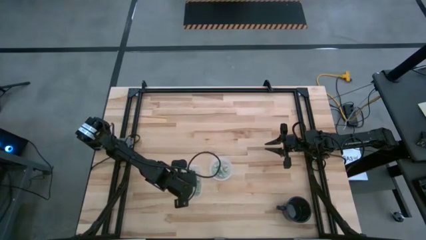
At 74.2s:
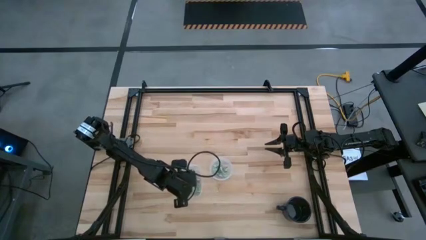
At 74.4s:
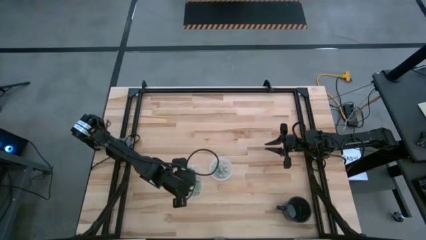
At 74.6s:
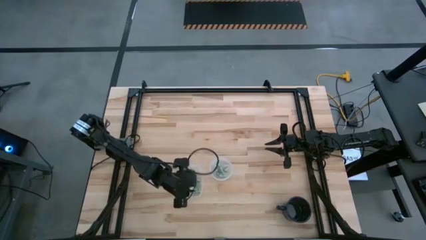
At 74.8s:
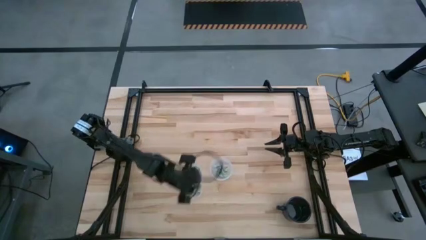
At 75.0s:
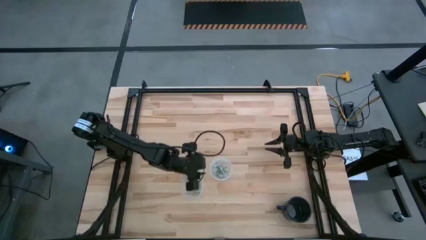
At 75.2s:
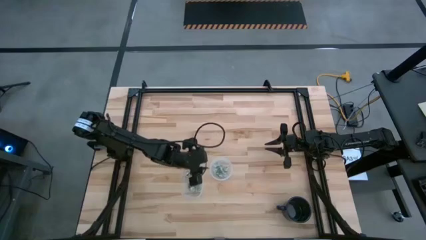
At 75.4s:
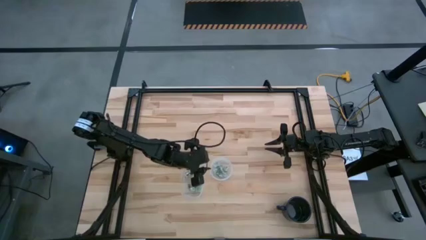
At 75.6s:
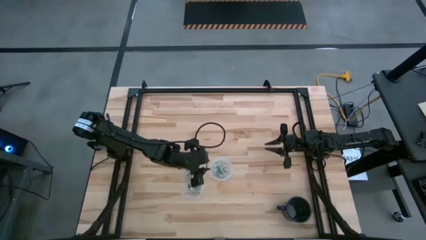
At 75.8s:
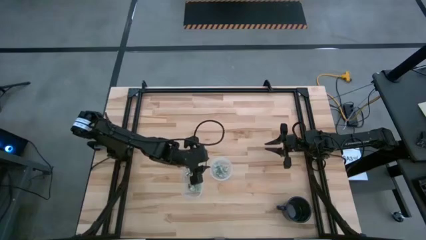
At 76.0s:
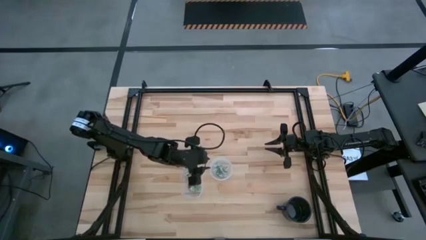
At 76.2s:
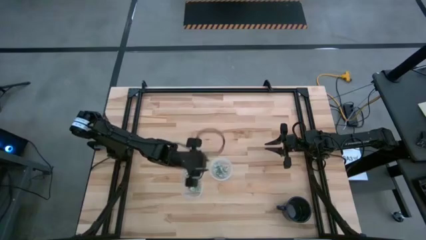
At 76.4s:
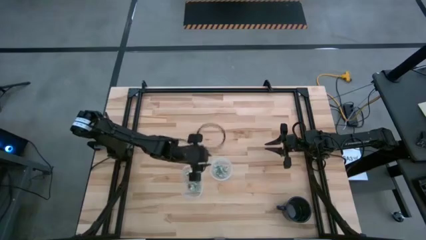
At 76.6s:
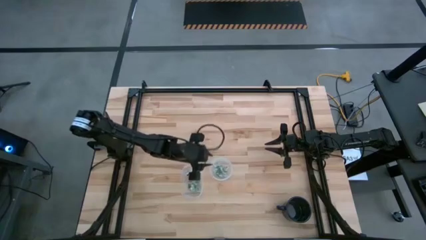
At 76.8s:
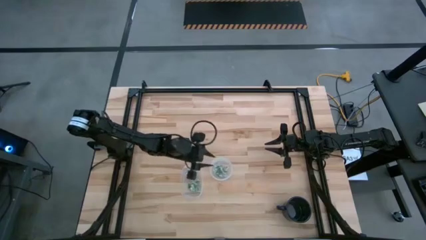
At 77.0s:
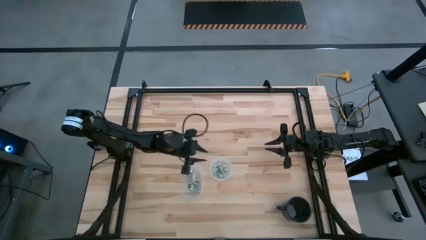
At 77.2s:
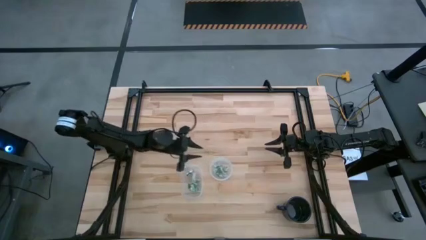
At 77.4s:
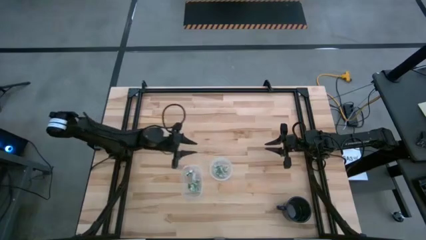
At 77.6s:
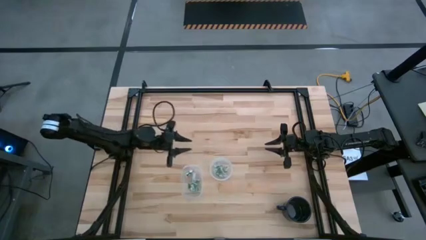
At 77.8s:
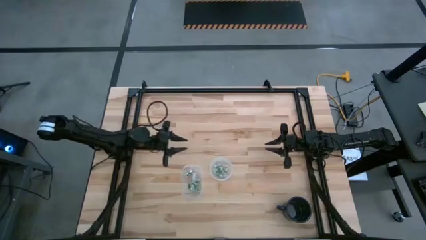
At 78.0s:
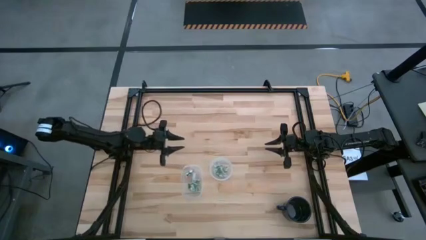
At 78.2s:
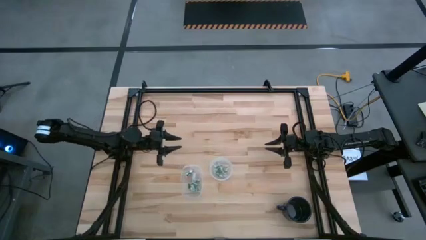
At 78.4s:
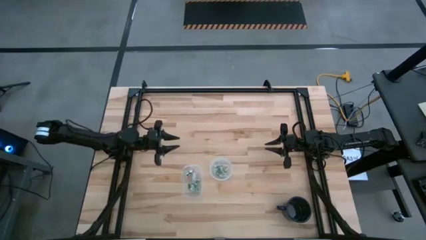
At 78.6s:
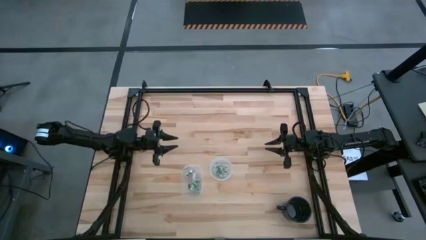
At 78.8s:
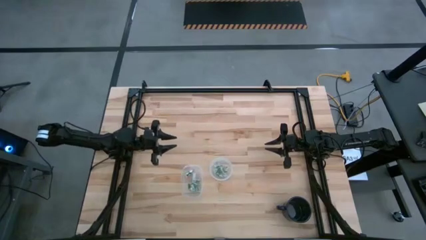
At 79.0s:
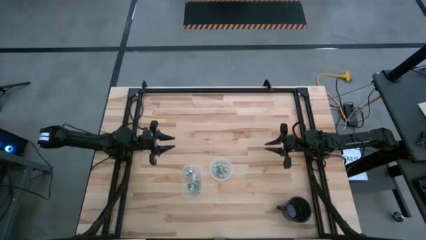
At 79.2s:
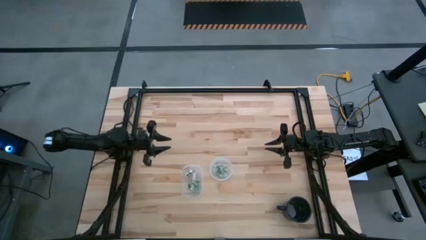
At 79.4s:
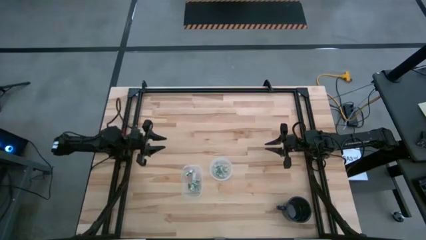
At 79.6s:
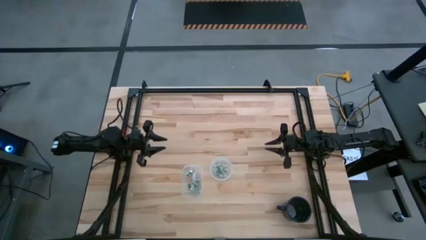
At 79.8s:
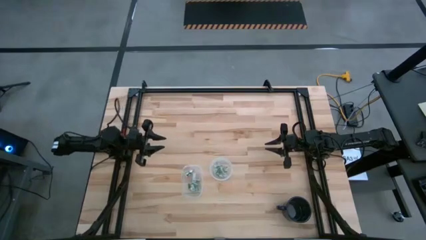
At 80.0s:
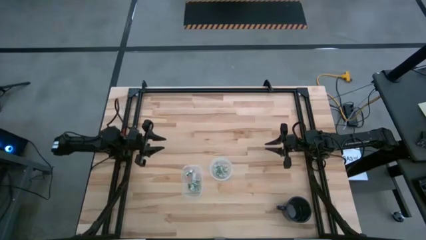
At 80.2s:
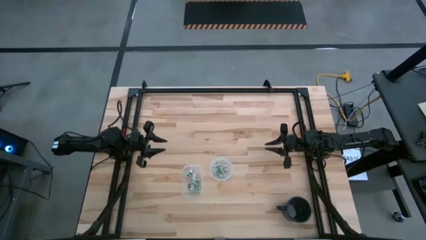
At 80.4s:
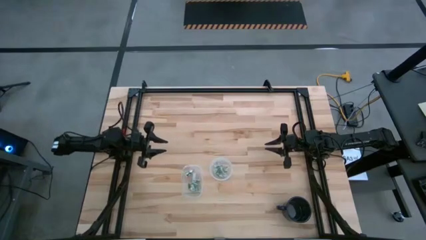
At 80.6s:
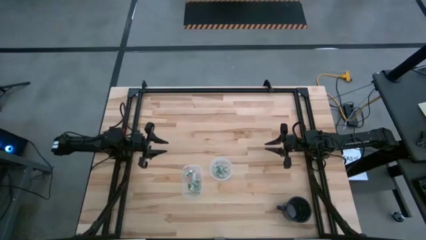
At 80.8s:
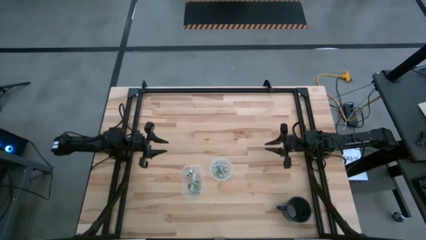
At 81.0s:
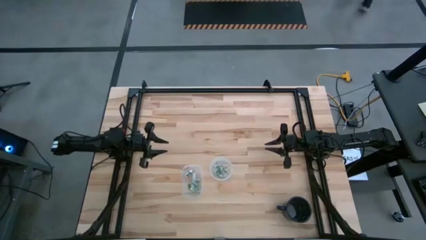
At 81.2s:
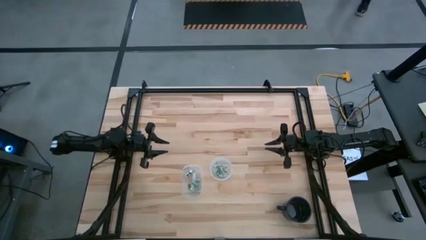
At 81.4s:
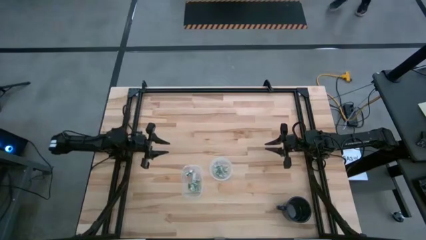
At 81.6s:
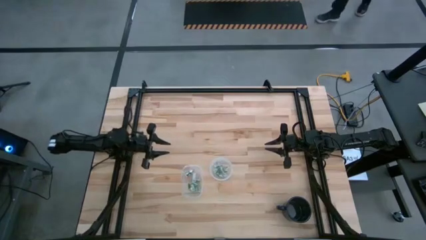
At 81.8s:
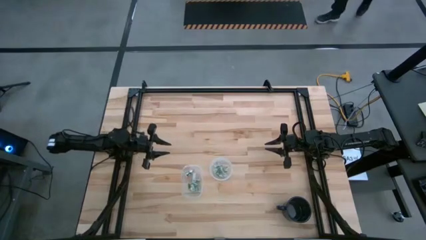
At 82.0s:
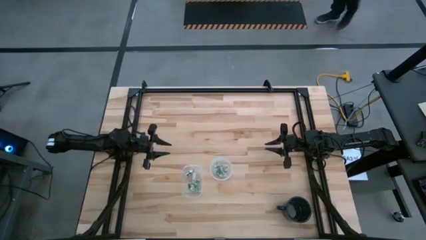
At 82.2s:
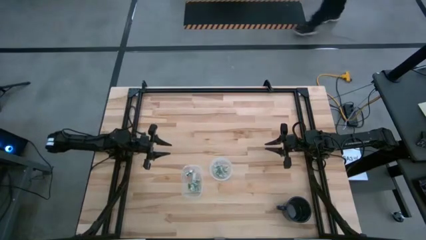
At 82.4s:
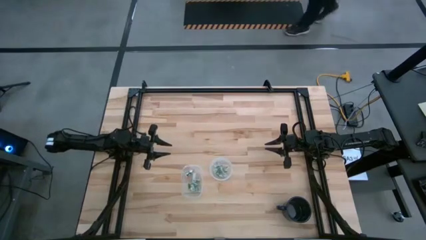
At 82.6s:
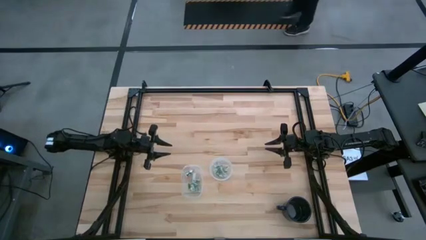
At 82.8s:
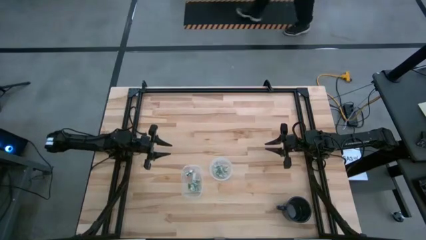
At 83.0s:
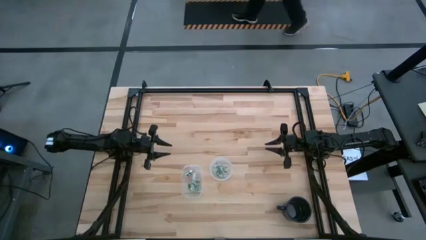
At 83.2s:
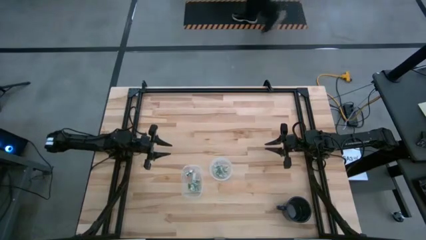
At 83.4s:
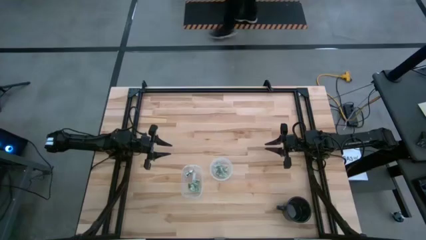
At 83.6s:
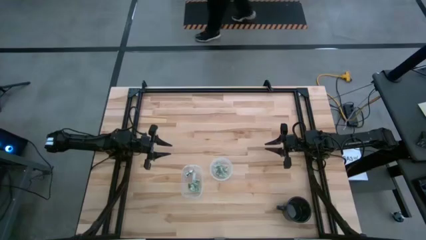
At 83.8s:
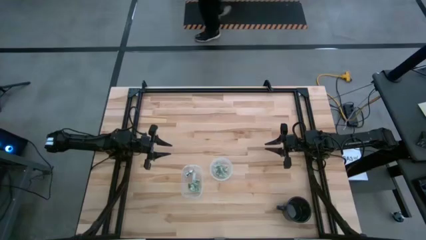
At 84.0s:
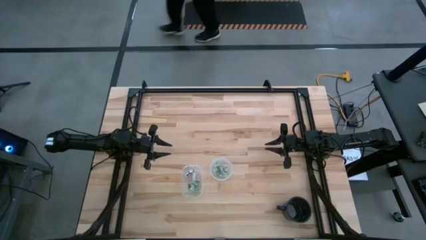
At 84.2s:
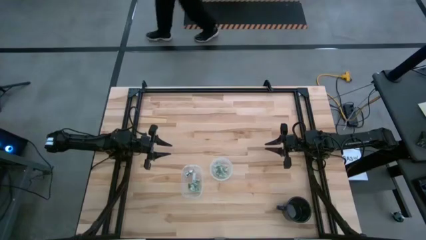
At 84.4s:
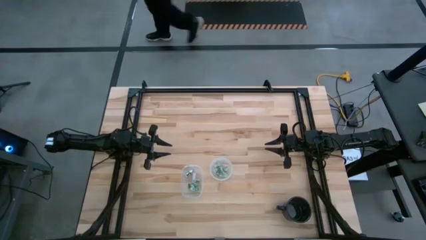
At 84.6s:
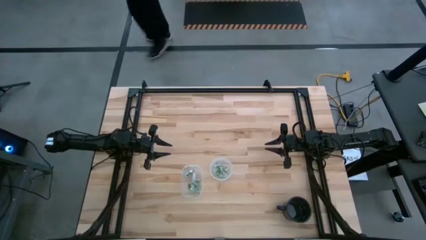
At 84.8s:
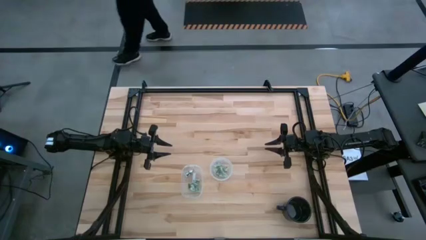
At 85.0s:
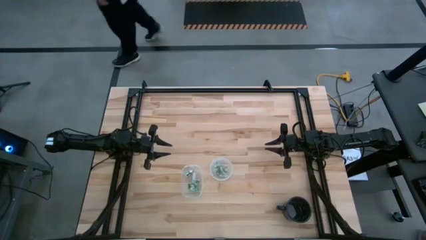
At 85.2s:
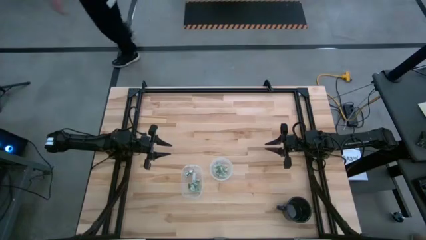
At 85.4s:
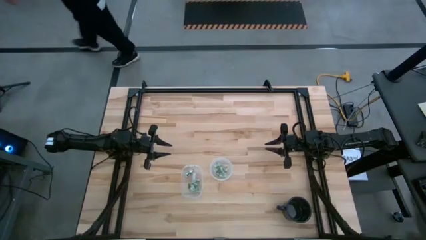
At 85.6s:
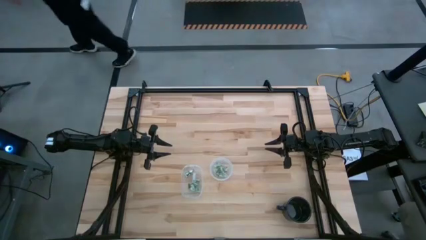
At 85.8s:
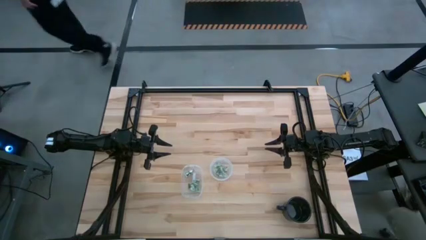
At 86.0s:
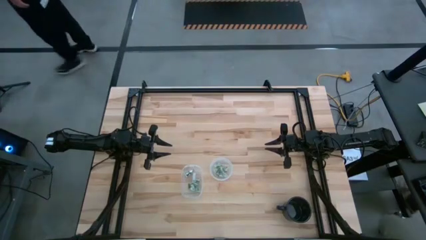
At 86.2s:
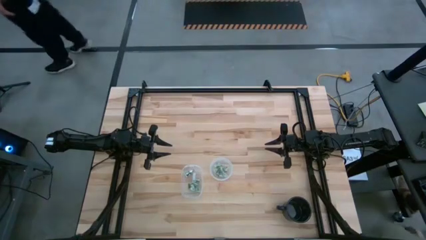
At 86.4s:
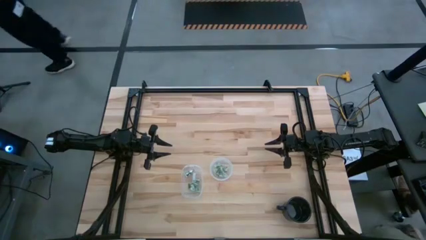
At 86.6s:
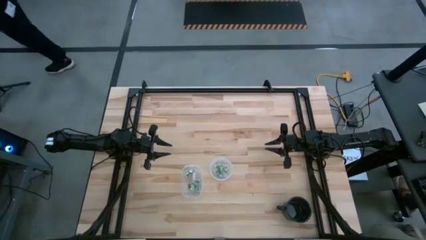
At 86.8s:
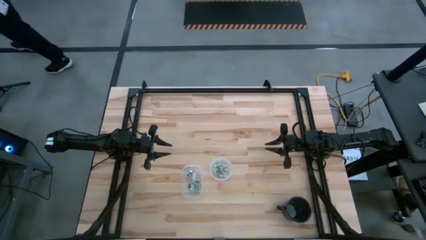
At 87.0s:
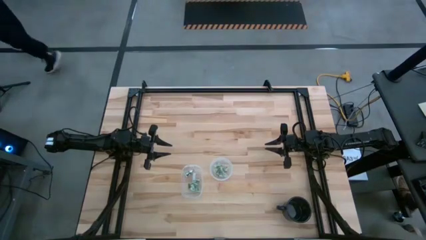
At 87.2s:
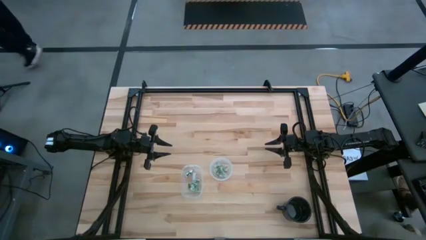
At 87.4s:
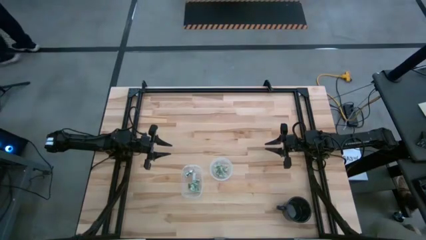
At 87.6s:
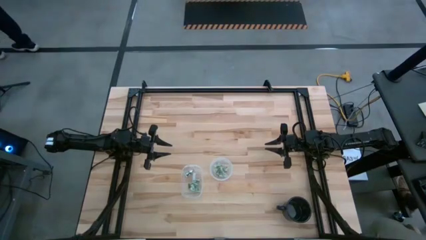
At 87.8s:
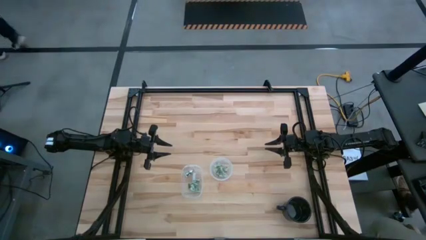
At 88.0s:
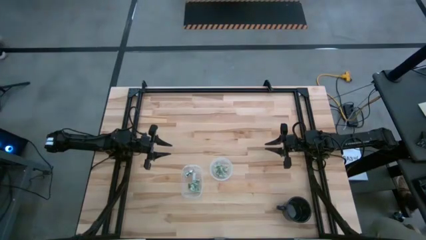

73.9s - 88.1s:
Task: Pick and place items into bin
Return to Home Position

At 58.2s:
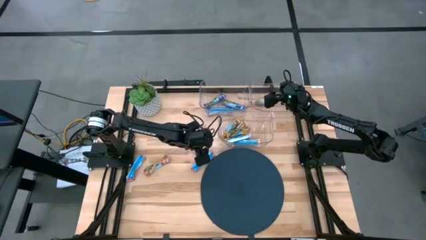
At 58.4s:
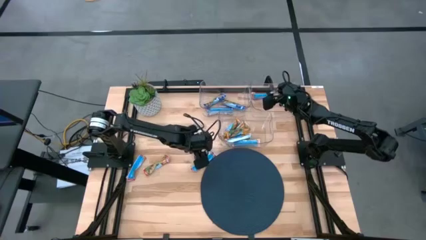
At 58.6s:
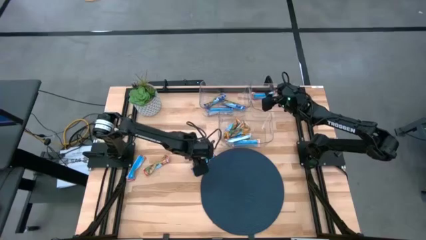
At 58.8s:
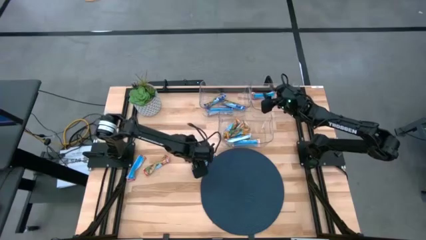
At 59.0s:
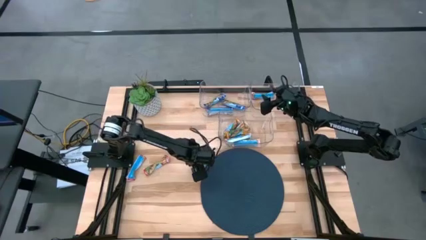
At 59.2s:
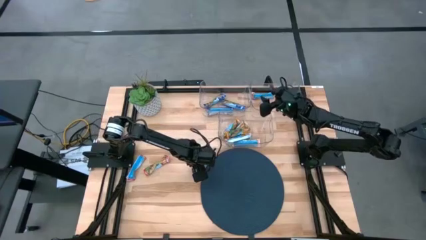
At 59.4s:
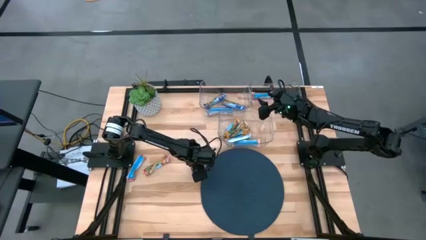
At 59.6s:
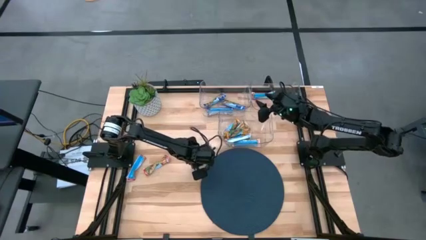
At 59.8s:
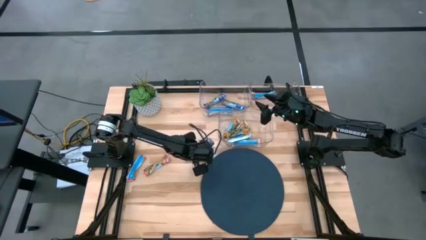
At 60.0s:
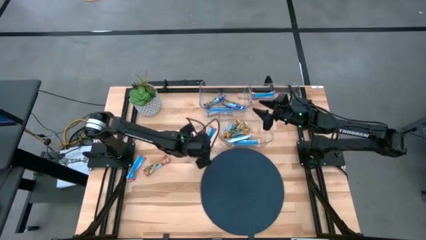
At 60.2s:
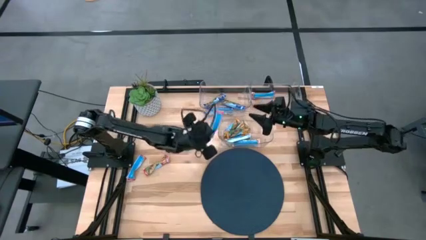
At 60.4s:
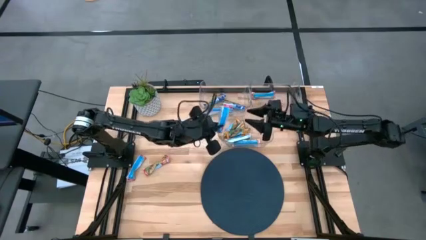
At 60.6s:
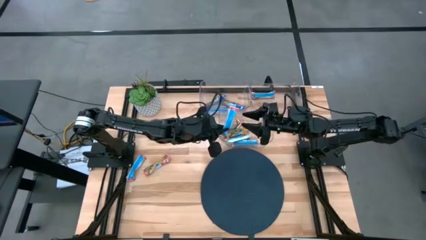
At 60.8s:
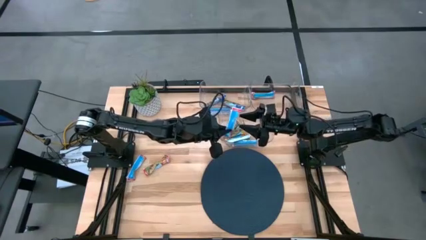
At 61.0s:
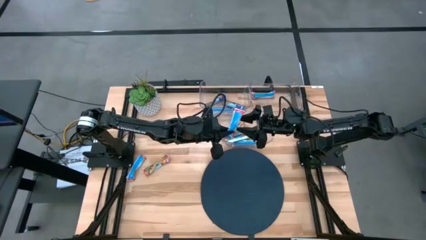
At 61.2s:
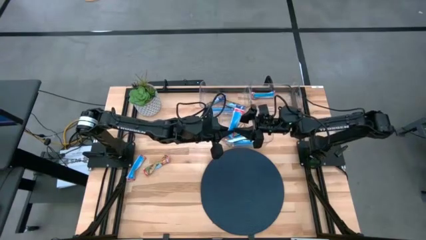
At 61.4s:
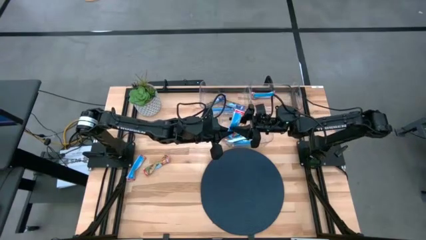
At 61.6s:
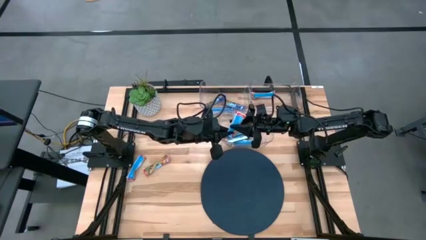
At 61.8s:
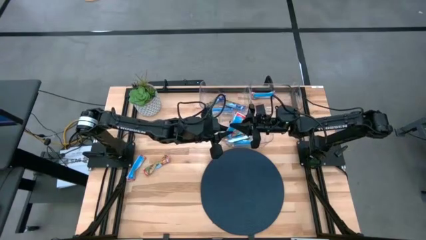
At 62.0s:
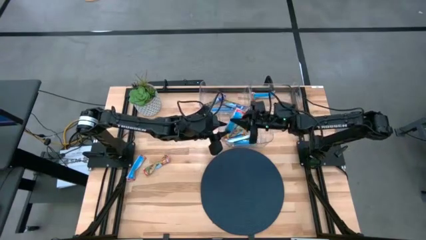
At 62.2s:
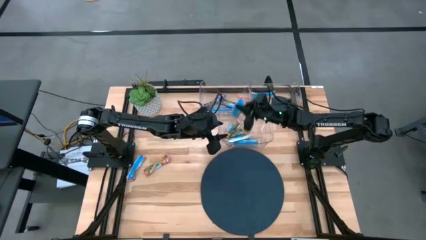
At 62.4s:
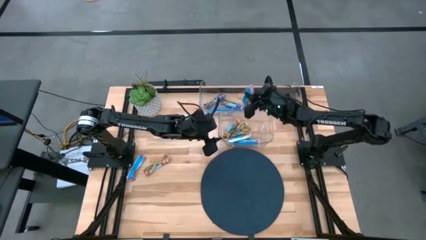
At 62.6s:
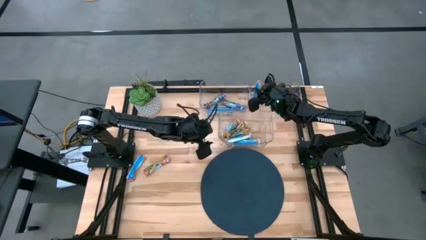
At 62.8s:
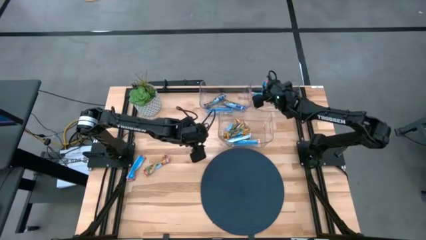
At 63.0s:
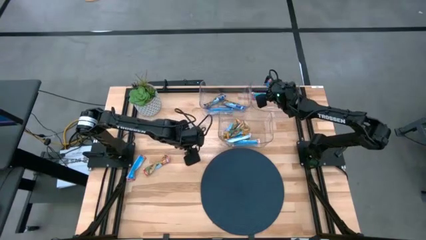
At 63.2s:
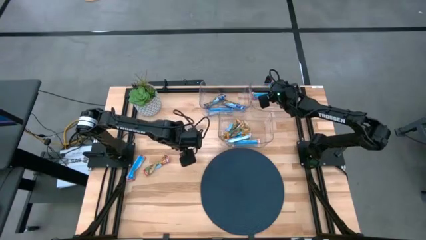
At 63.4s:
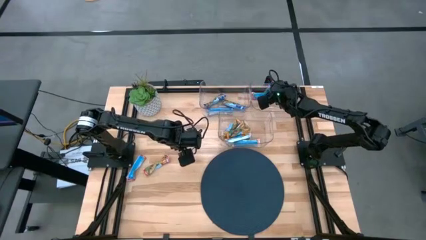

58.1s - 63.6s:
Task: Pick and place Granola Bars by type
Put the red granola bar into the top right transparent bin
